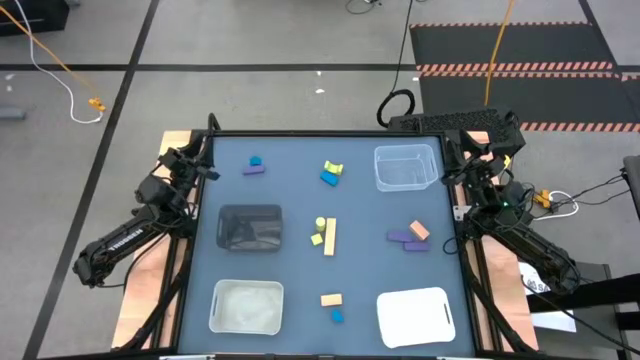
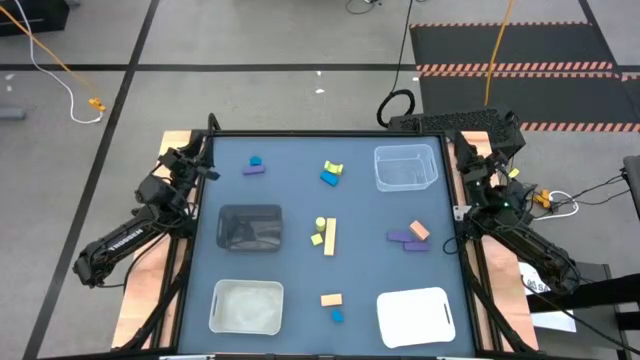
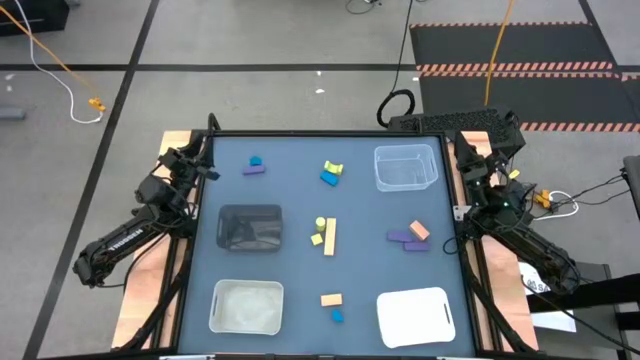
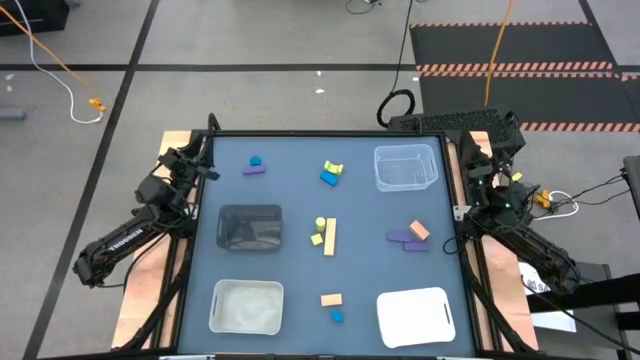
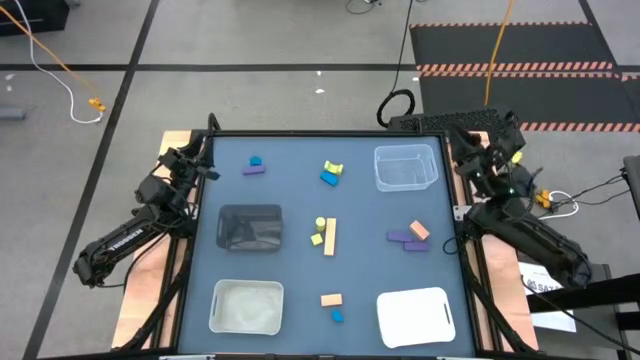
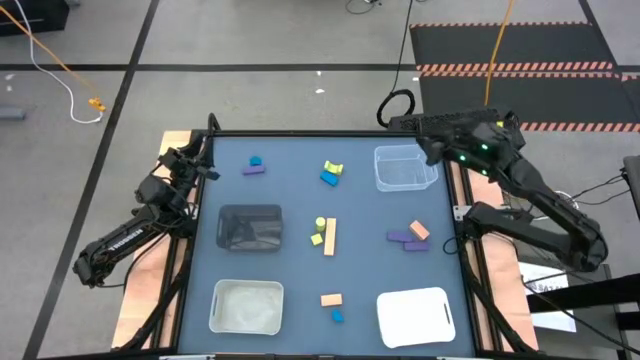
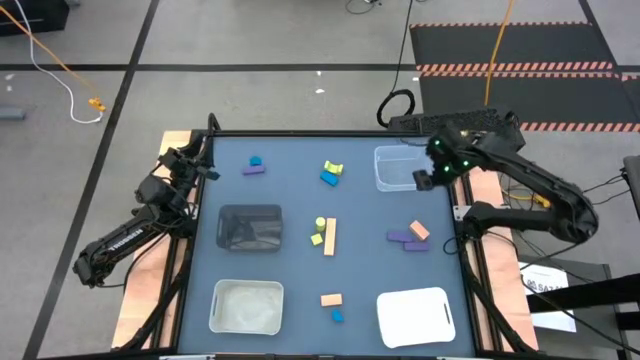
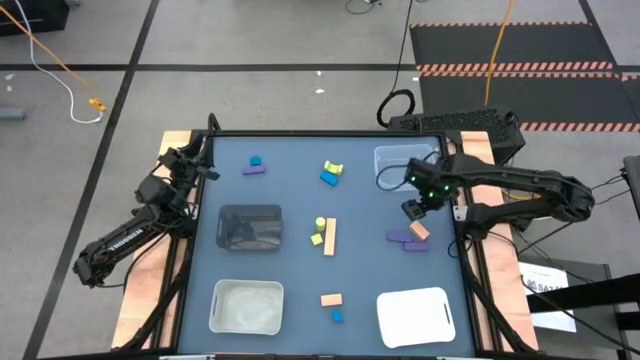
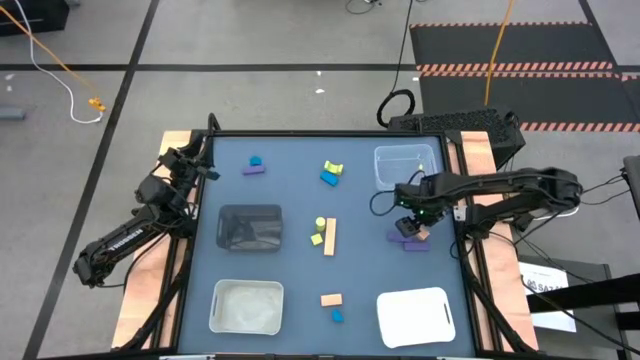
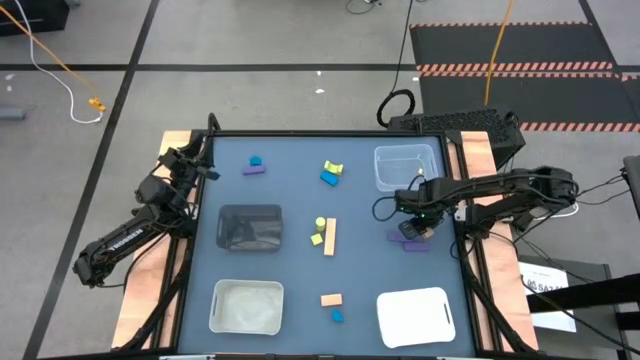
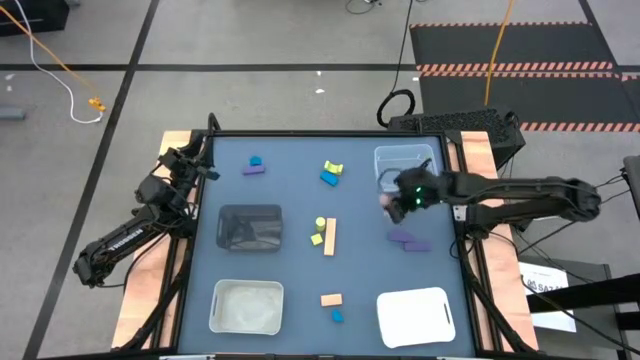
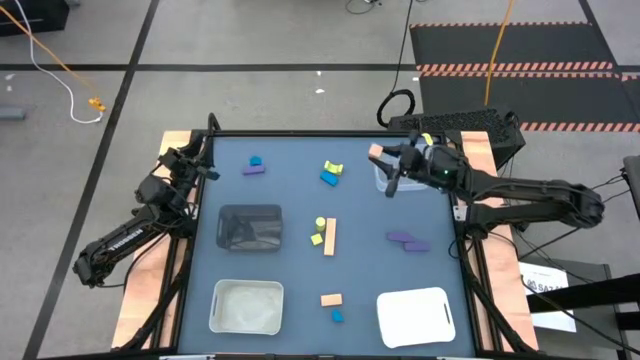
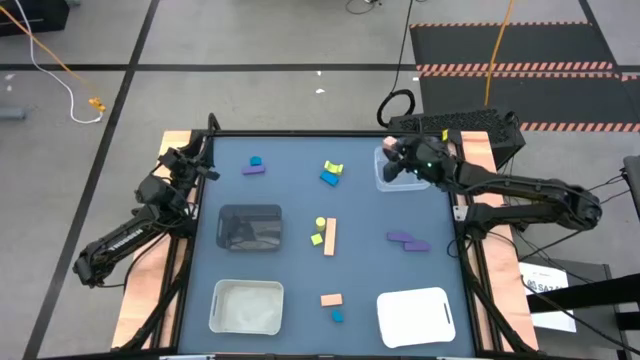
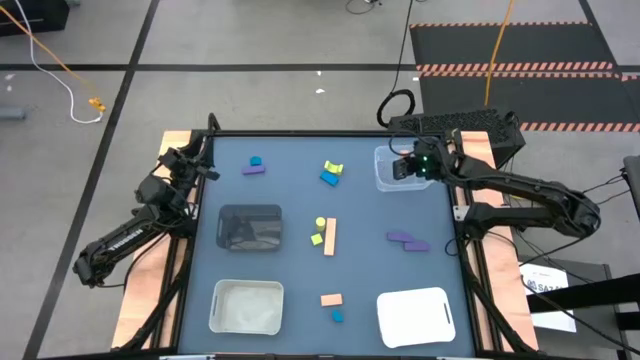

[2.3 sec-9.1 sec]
Task: Sort & place blocks by color
Put the top right light brown block into the transparent bin

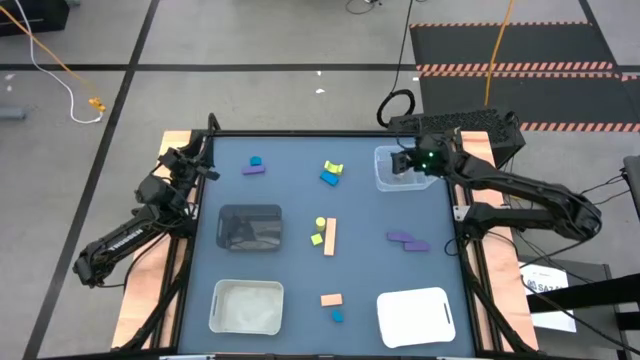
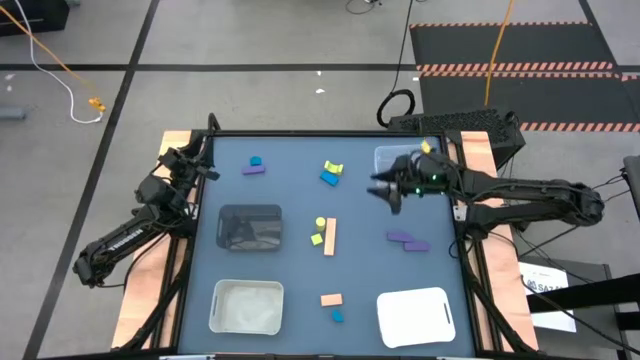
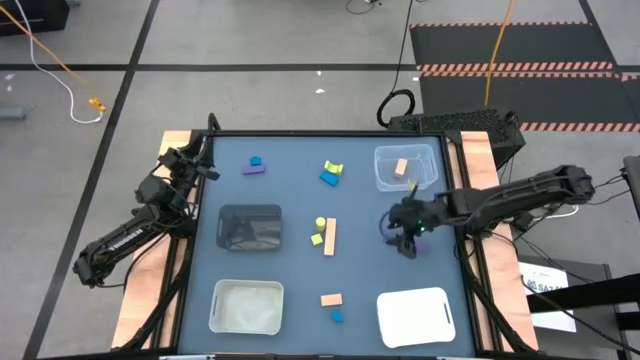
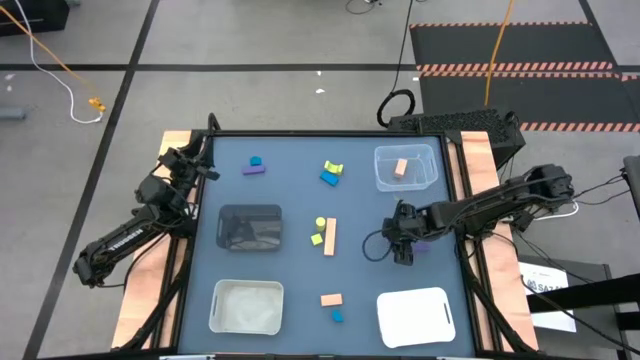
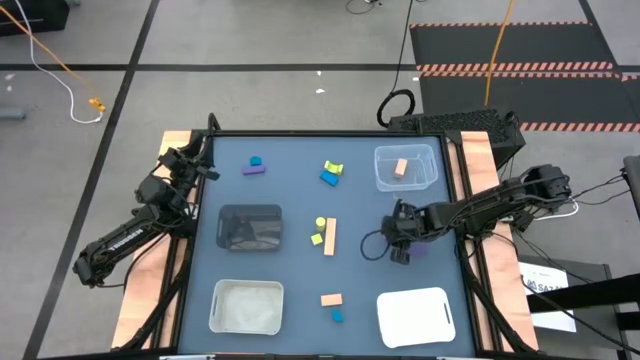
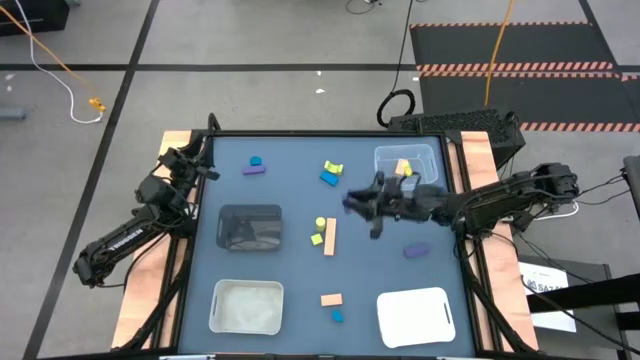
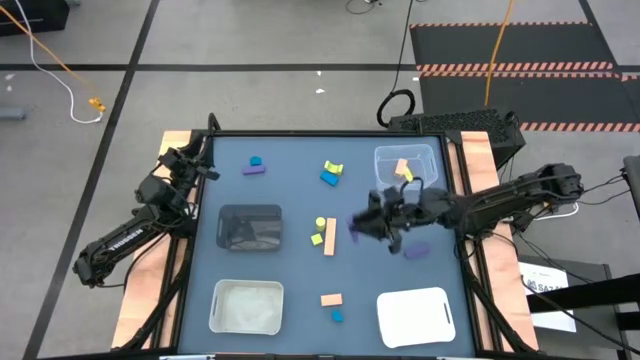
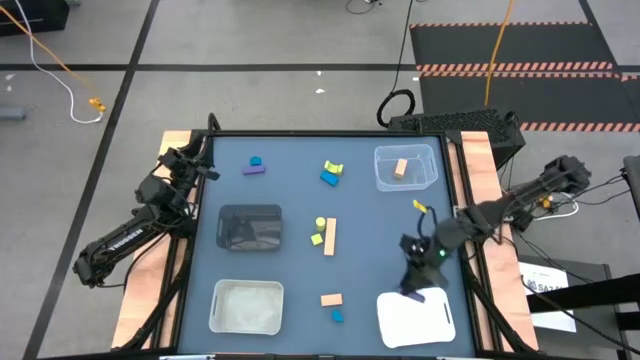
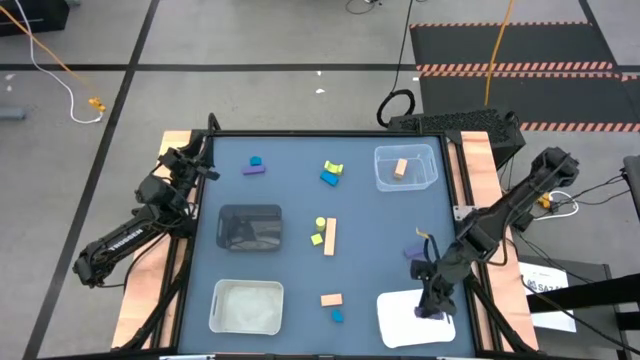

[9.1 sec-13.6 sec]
Put the middle right violet block into the white bin

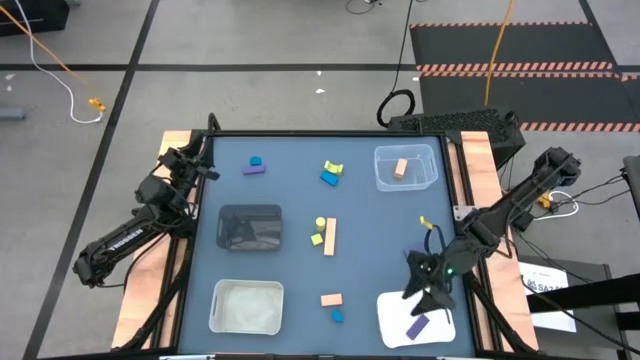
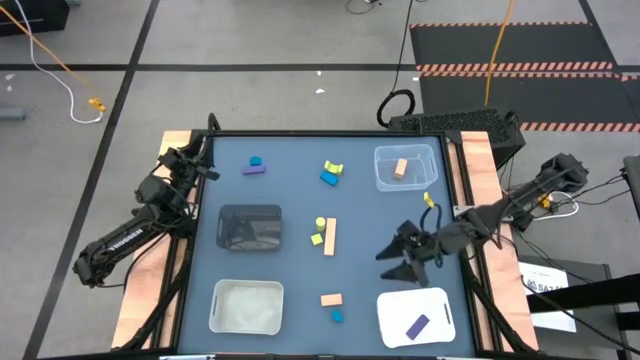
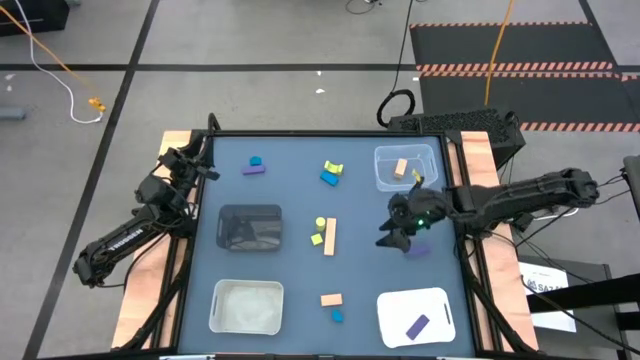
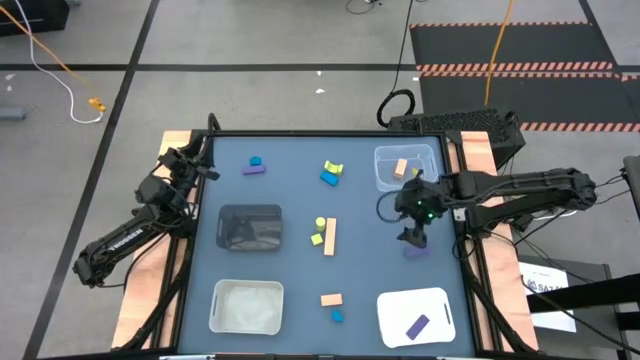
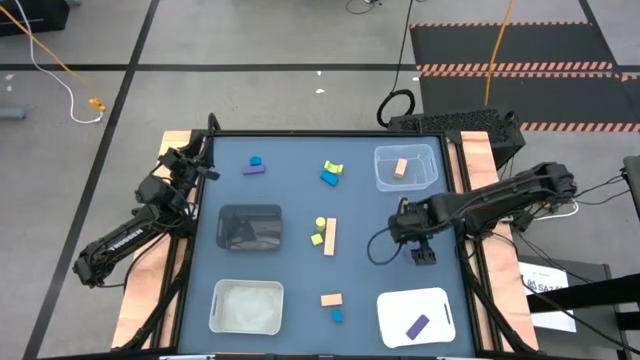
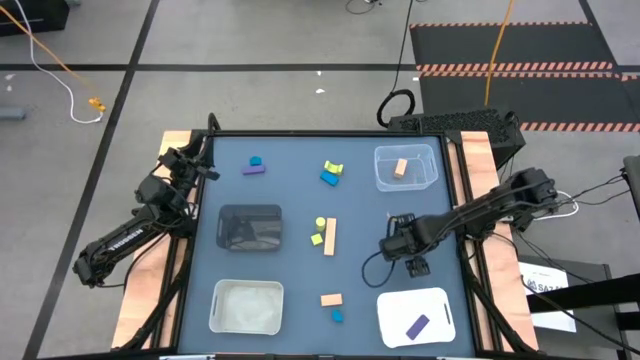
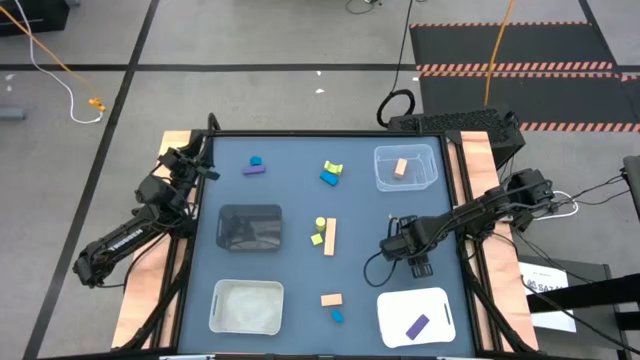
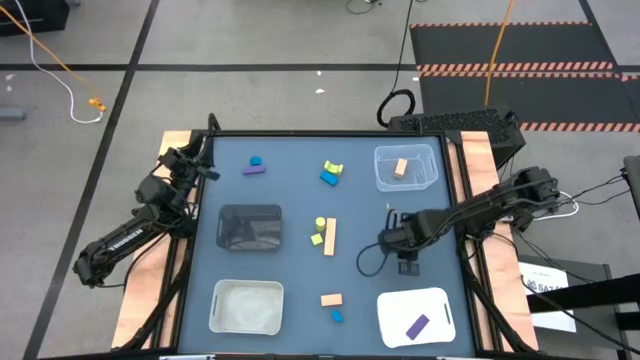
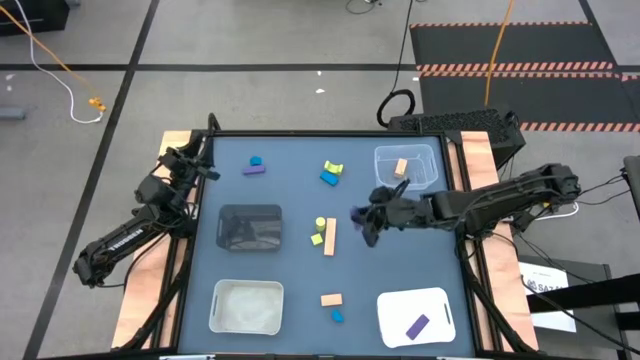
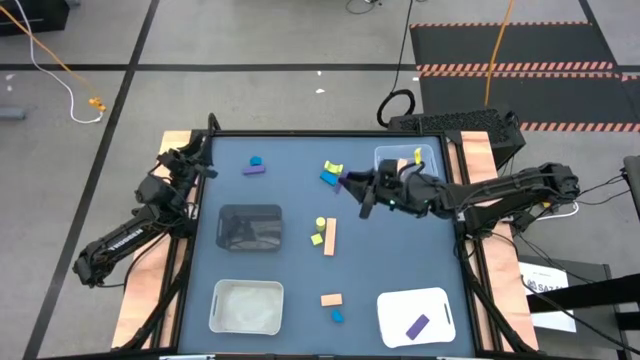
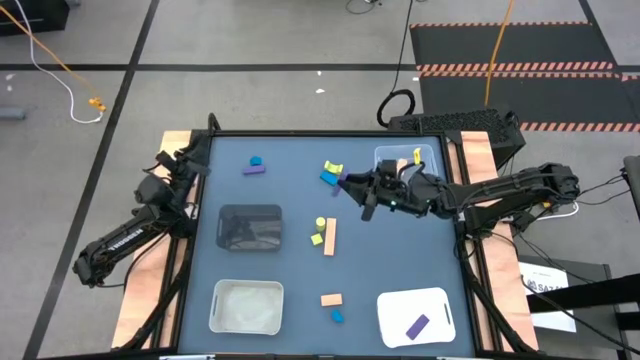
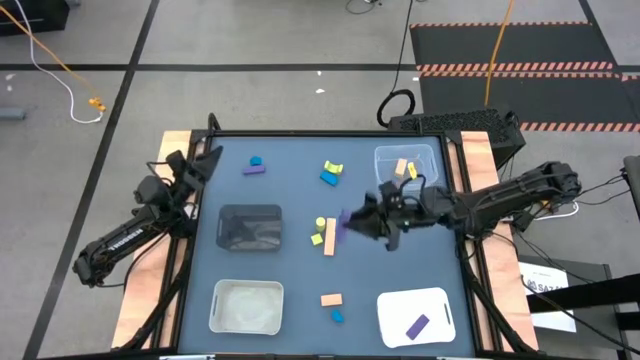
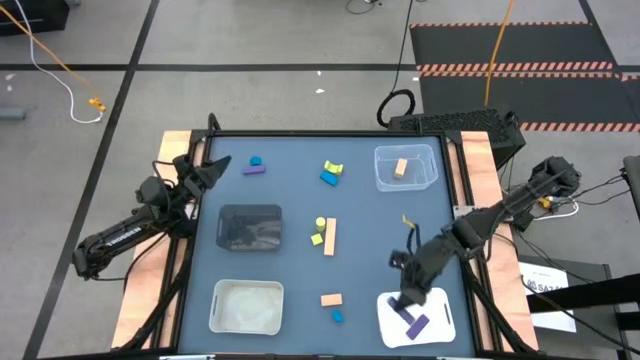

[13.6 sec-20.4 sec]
Put the bottom violet block into the white bin

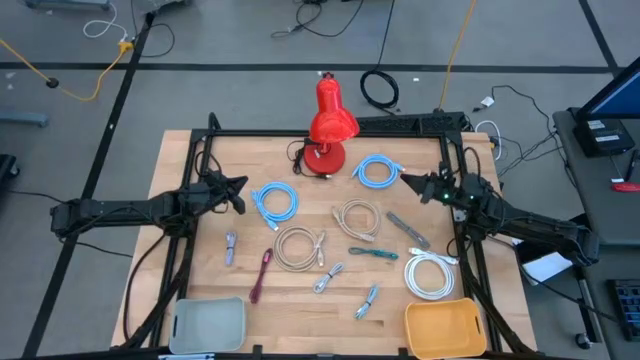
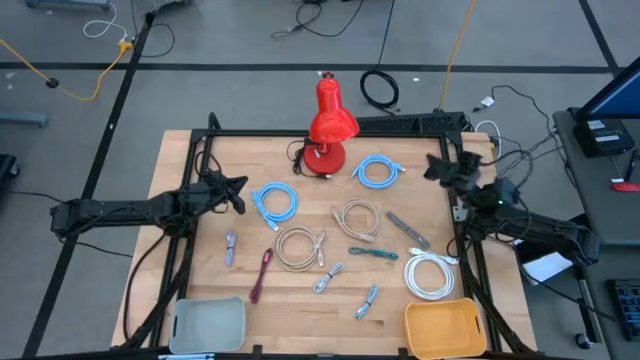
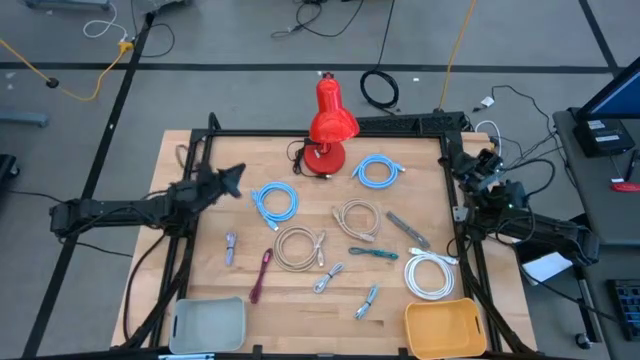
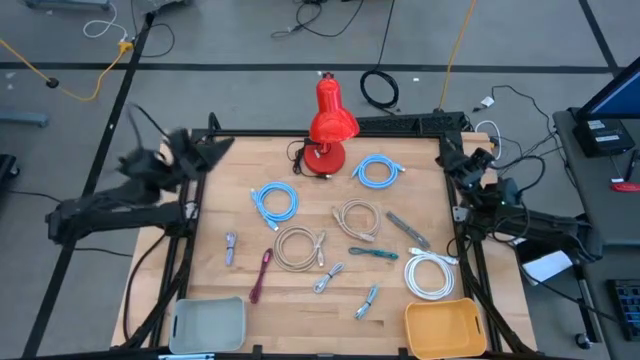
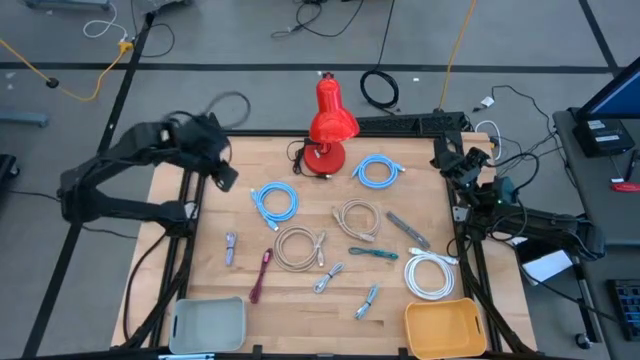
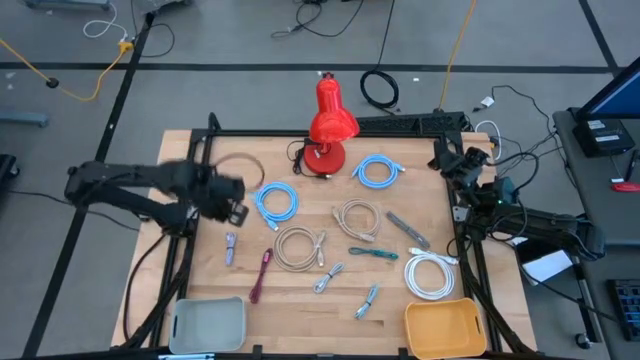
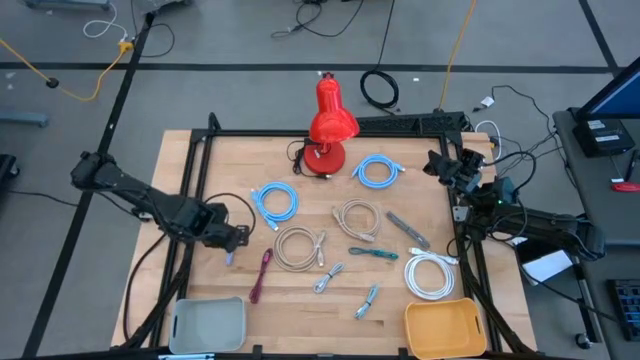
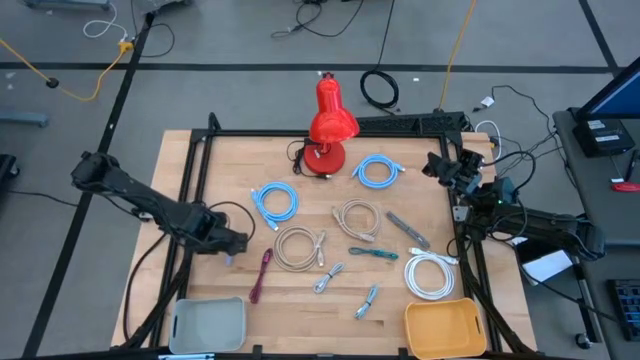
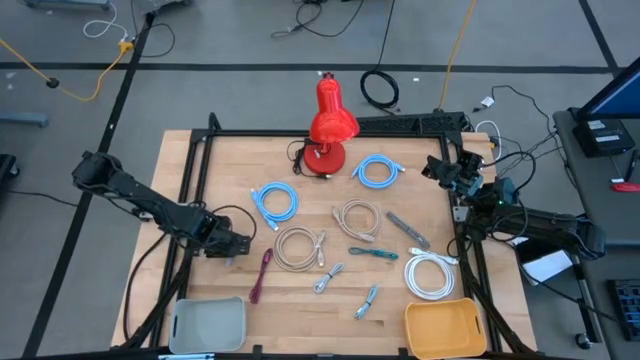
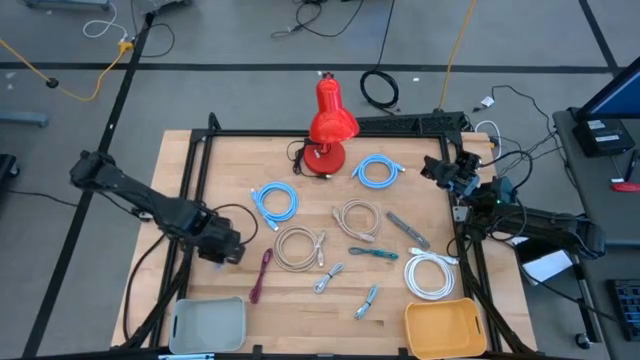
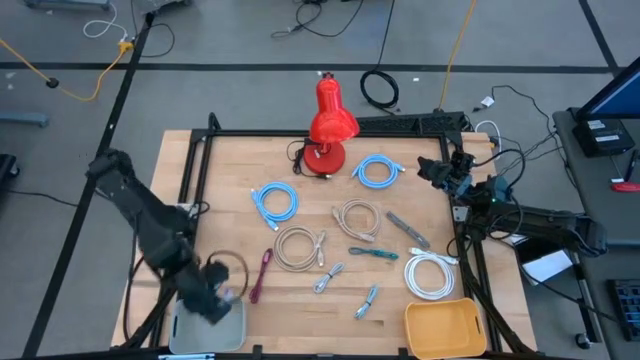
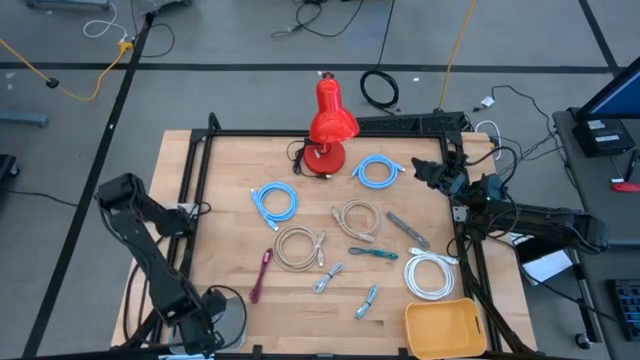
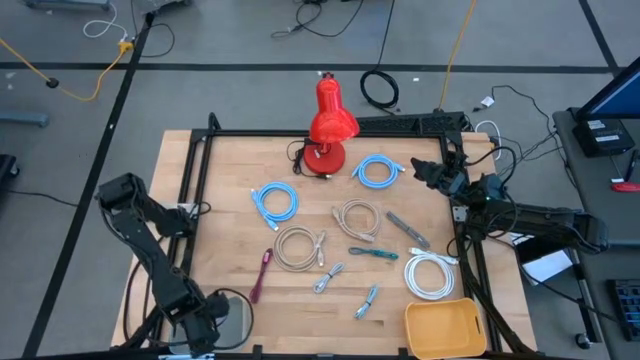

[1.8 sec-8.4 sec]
Task: Pick & Place USB Port
Put the light purple charger cable into the white bin
